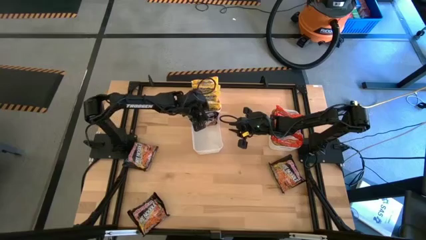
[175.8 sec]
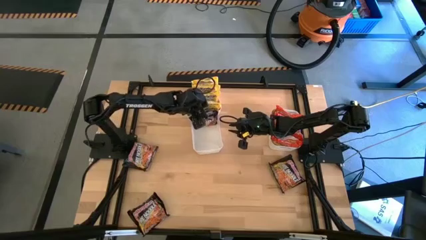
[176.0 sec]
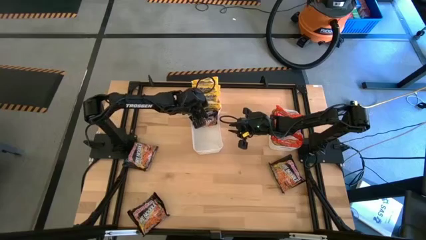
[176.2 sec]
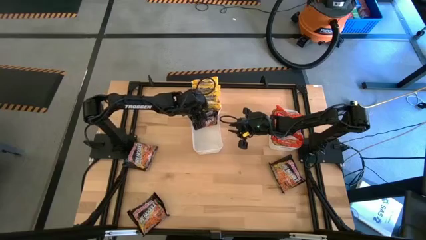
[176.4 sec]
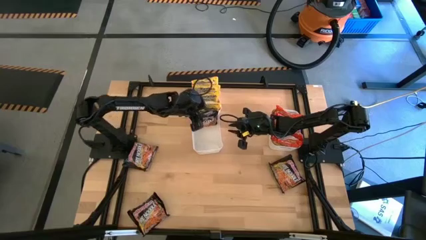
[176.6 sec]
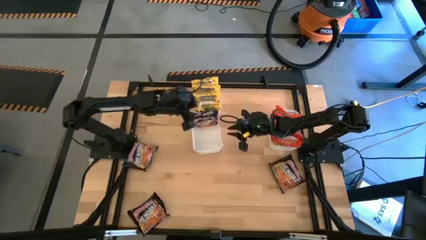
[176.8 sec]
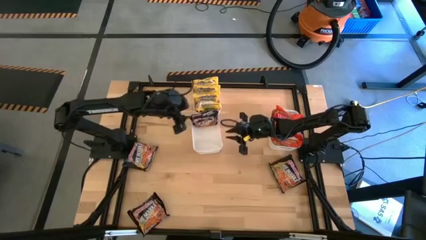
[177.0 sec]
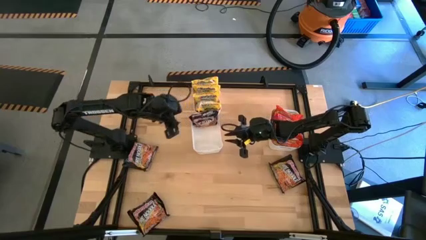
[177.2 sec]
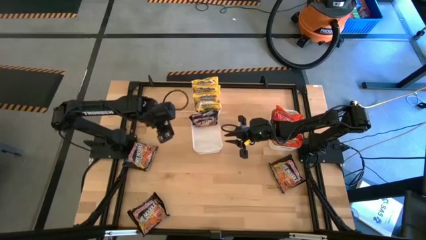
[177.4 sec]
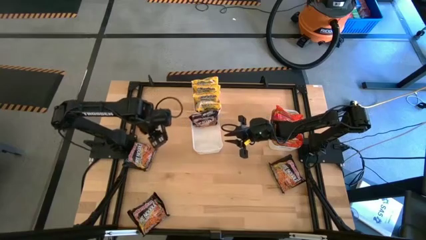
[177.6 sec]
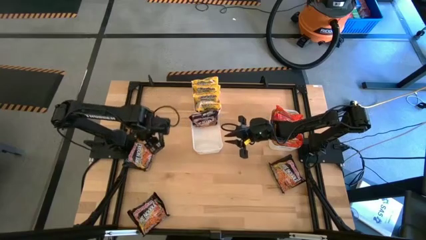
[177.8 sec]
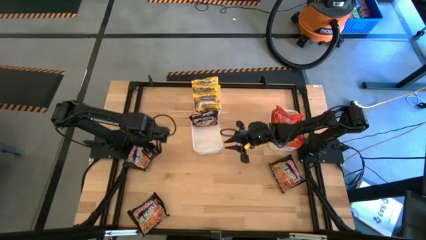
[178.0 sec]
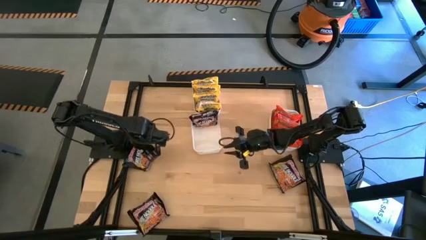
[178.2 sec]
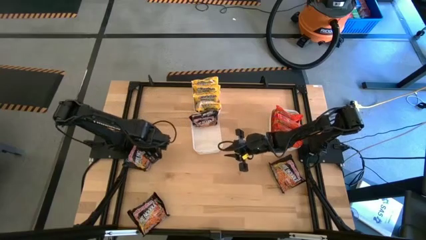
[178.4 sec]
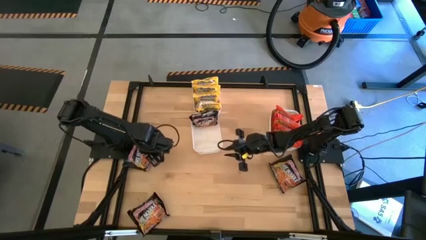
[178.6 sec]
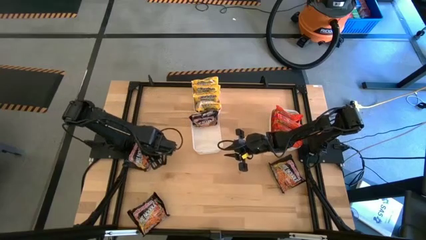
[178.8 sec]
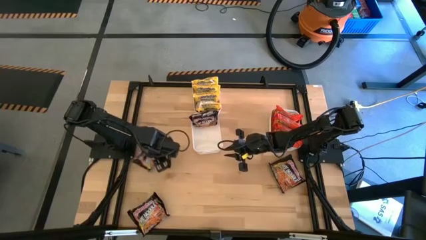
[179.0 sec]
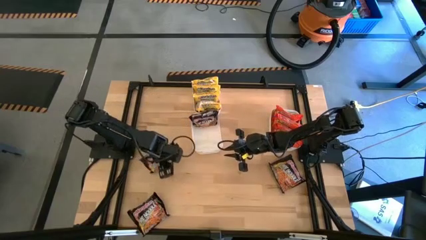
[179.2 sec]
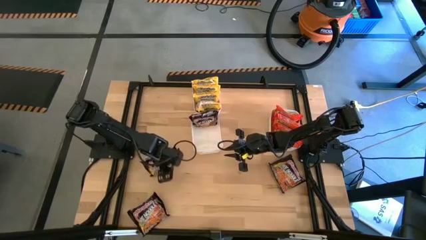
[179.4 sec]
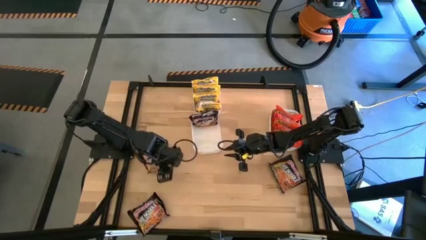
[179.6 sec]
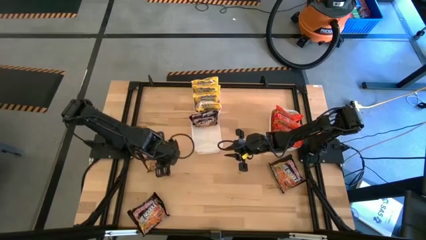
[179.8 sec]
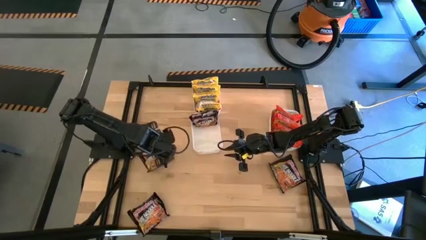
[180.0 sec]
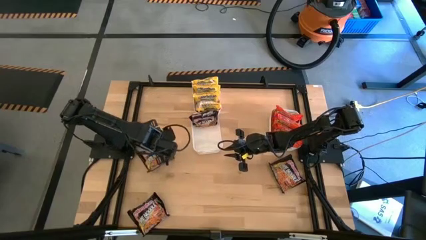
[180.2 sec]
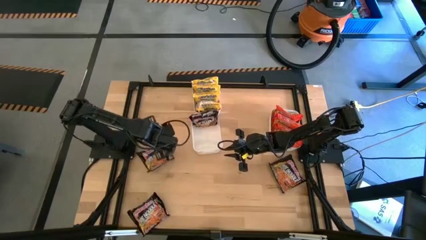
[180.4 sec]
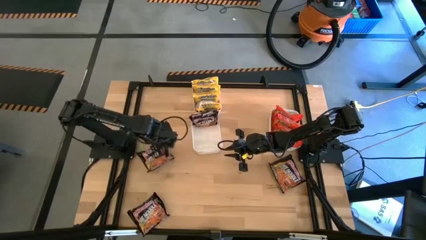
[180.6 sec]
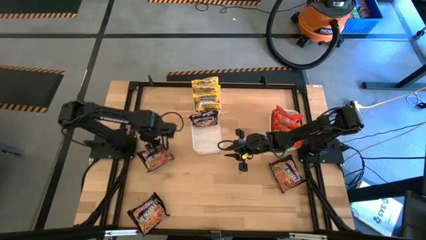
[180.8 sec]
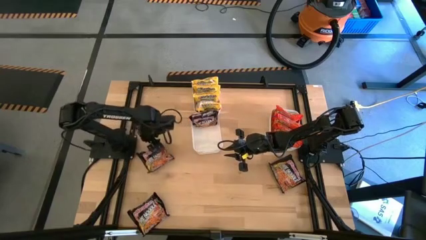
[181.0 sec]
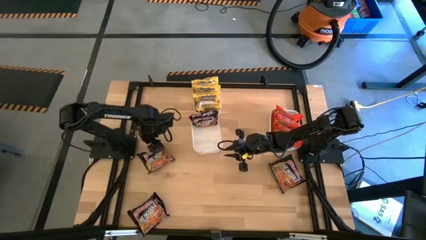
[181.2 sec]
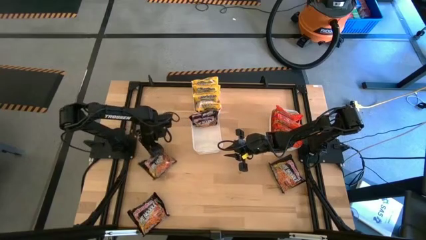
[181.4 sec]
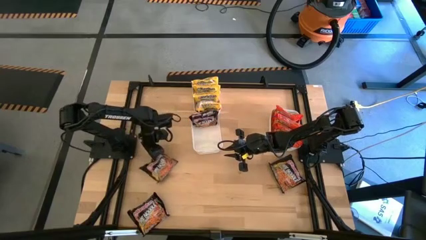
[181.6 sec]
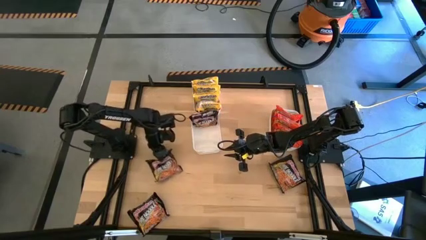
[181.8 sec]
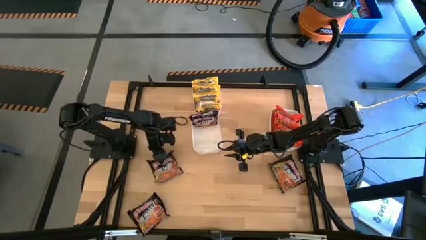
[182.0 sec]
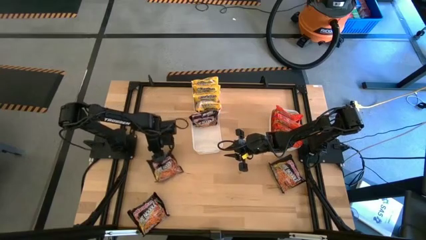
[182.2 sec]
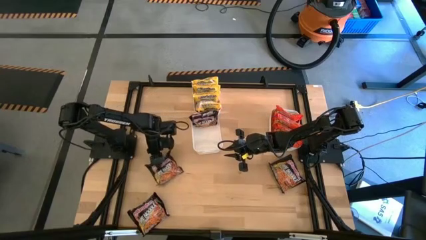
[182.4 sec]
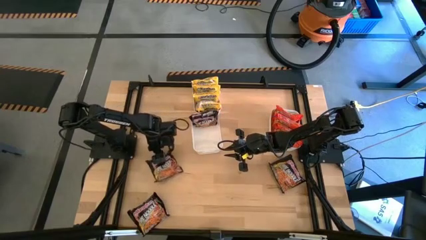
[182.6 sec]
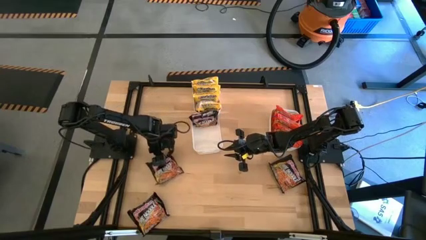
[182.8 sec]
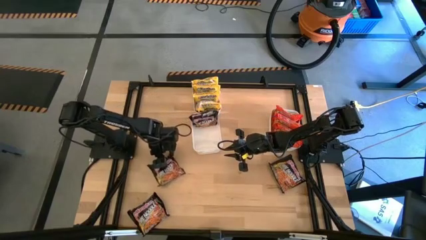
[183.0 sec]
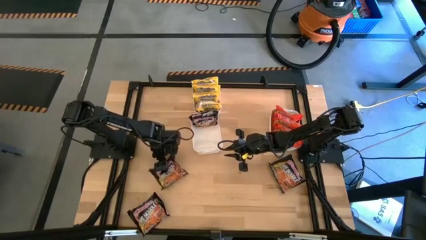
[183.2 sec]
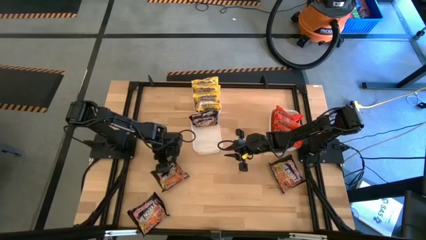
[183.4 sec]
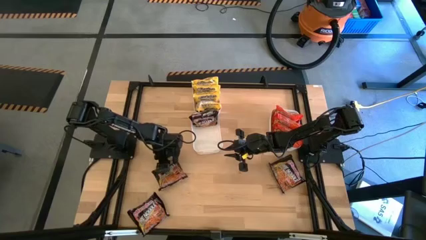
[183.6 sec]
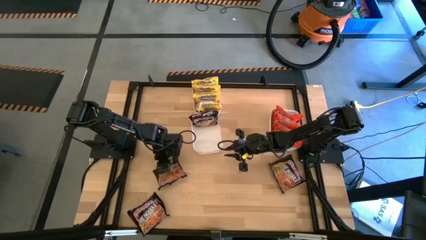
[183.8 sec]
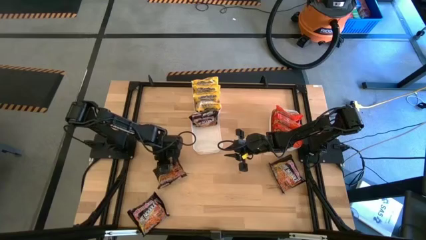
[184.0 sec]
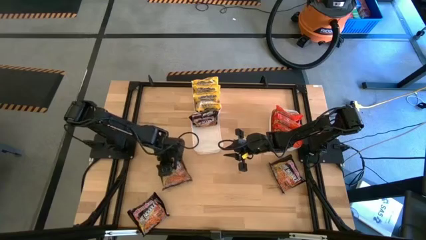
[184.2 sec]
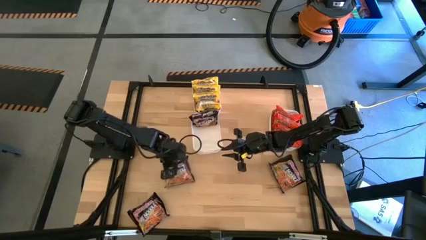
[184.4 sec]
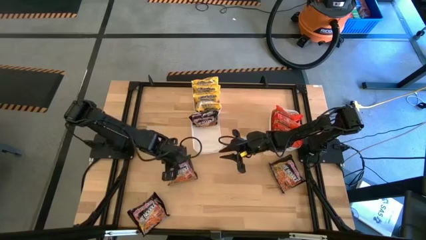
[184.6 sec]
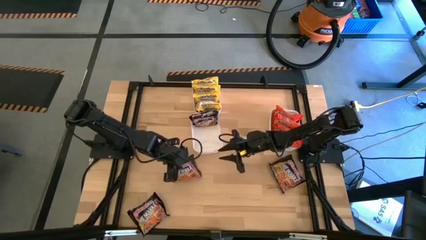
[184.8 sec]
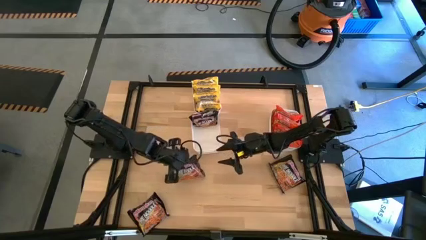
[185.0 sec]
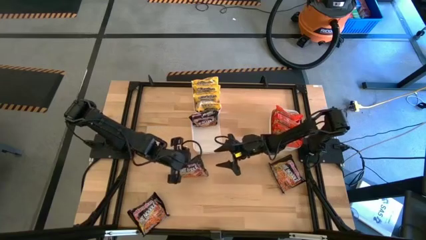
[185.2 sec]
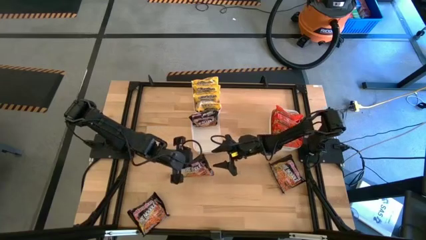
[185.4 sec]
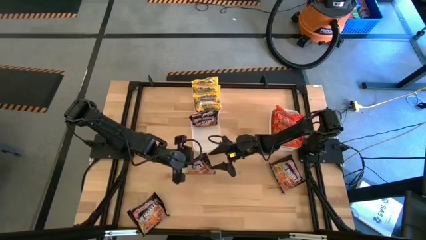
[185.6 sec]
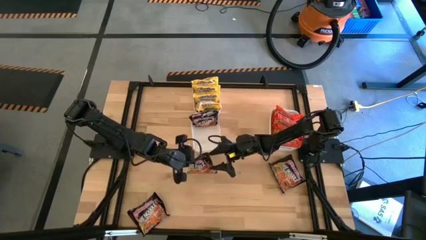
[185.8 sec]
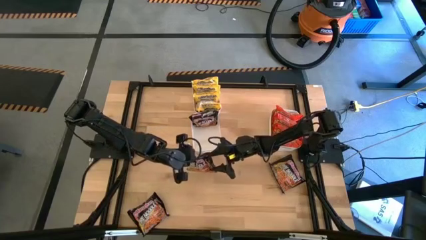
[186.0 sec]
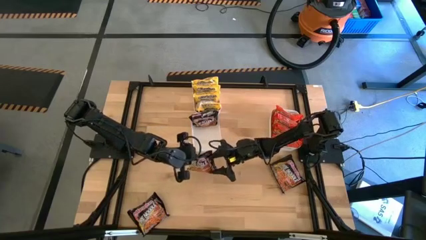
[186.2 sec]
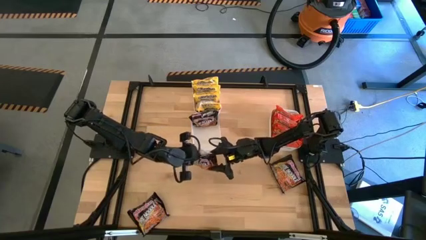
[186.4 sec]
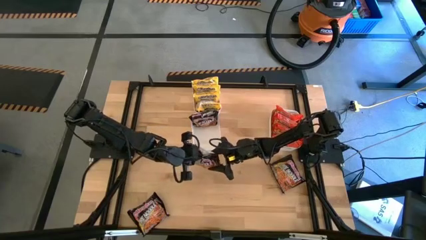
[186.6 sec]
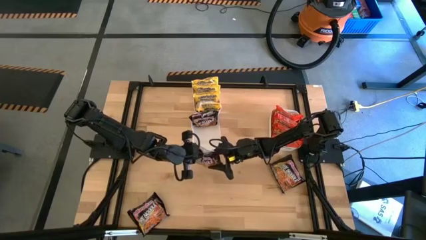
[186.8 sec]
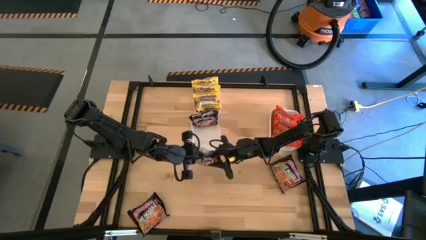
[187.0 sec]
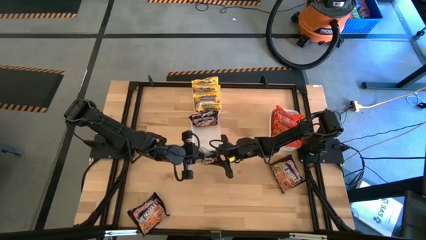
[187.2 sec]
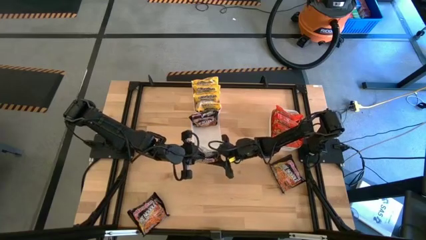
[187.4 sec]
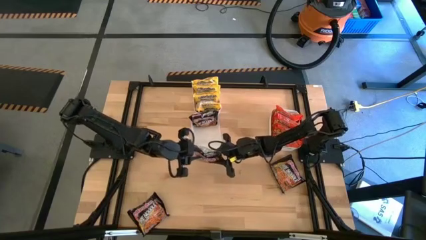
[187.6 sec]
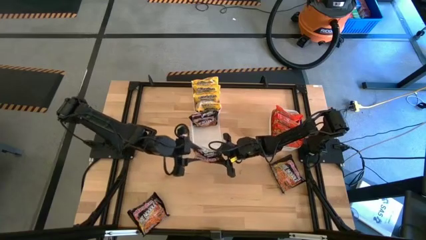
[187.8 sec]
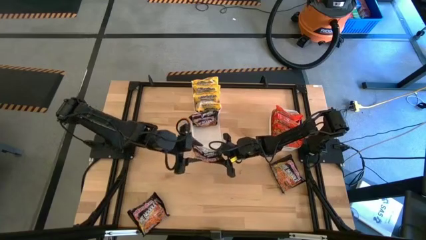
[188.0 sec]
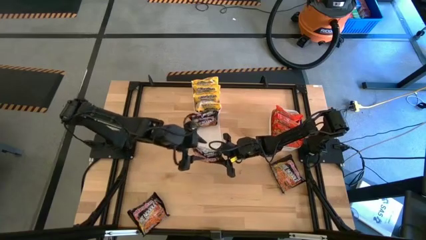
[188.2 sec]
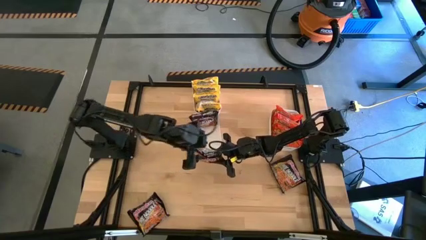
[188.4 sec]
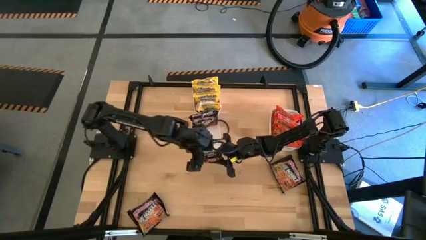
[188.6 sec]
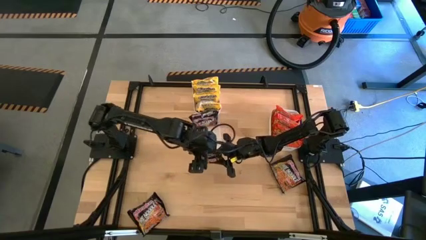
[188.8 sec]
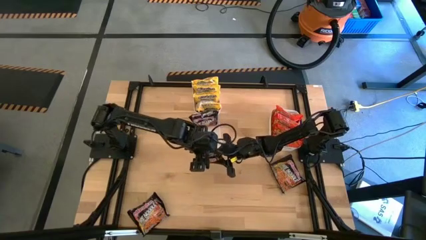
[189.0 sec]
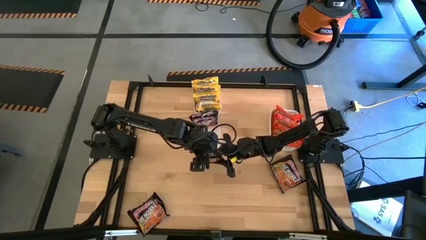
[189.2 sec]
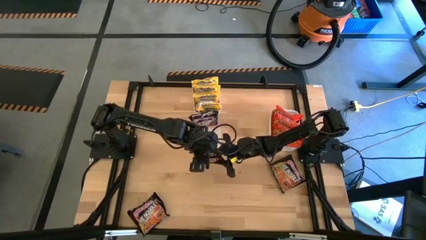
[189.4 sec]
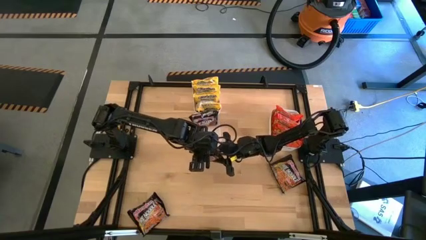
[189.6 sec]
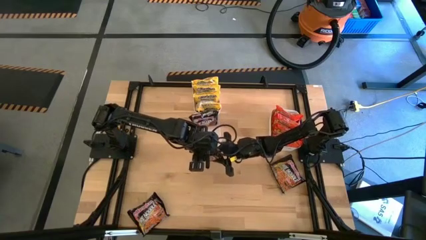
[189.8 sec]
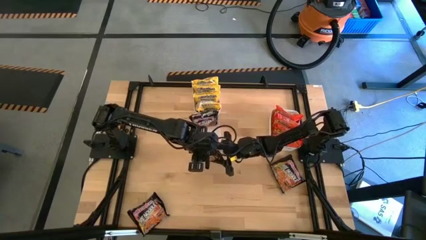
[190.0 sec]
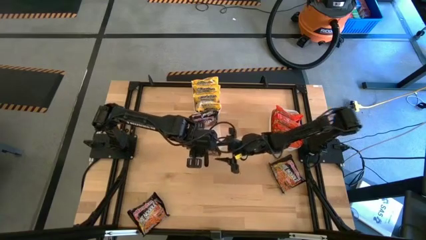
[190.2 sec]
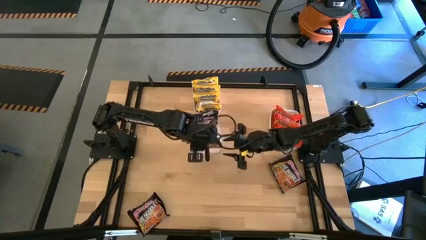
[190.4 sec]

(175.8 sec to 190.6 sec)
Task: Sort Maruchan noodles
Put the black noodle pack into the bottom left white bin
